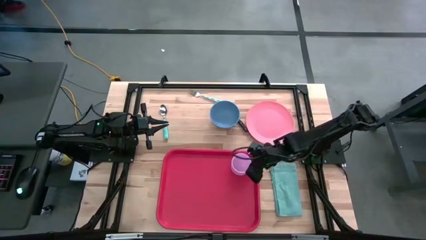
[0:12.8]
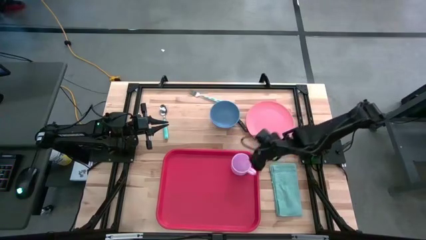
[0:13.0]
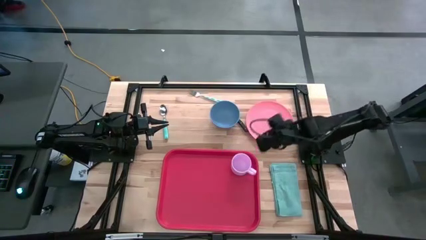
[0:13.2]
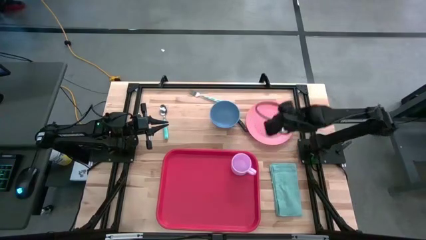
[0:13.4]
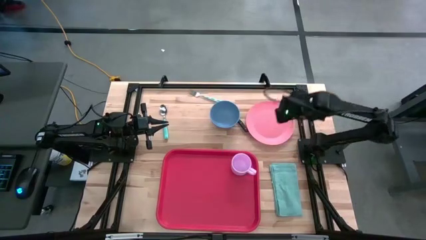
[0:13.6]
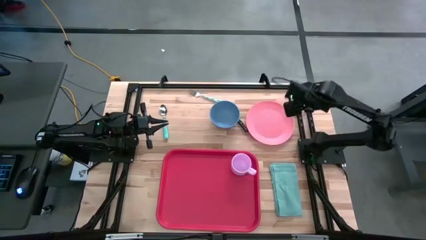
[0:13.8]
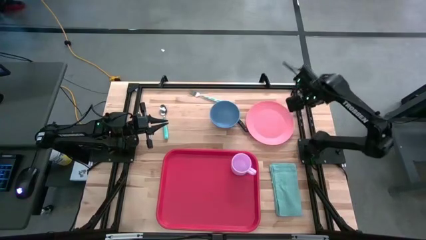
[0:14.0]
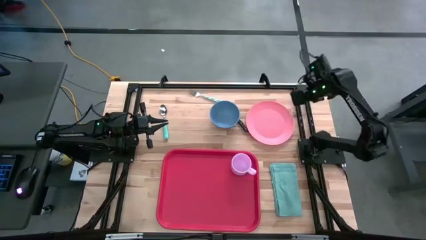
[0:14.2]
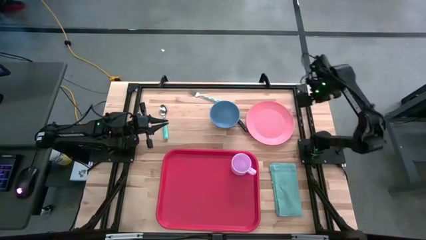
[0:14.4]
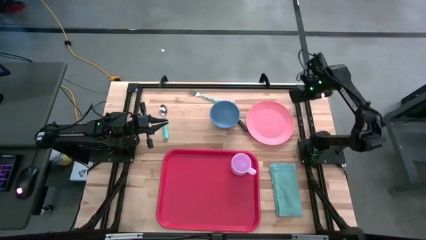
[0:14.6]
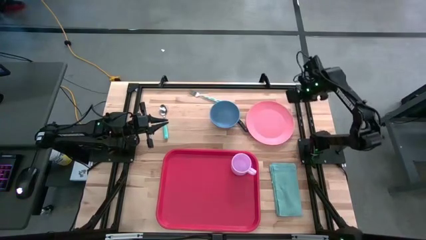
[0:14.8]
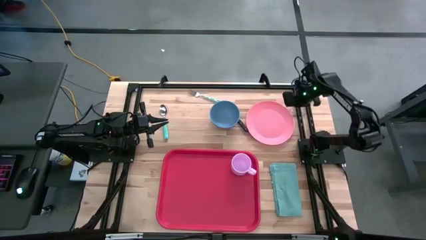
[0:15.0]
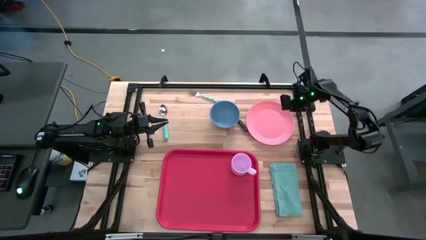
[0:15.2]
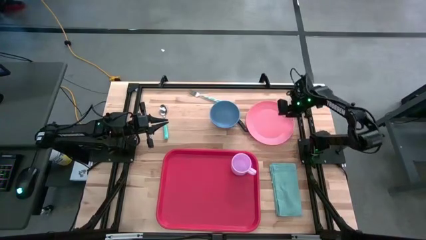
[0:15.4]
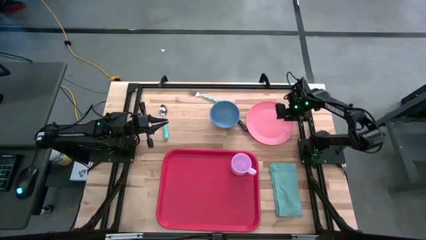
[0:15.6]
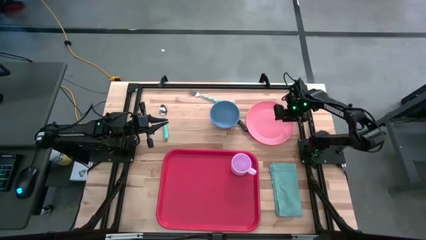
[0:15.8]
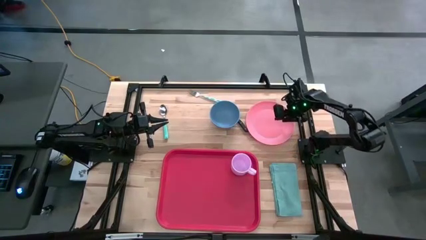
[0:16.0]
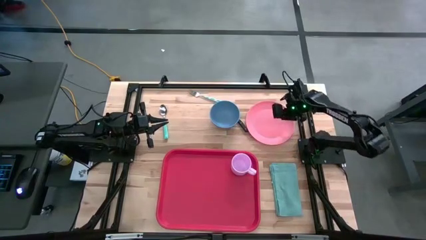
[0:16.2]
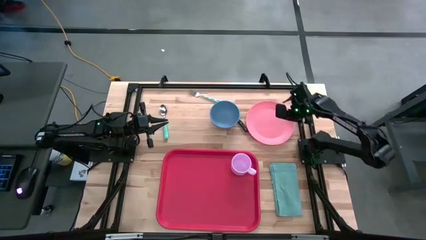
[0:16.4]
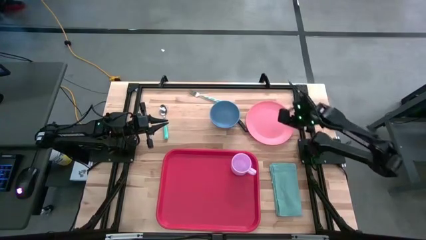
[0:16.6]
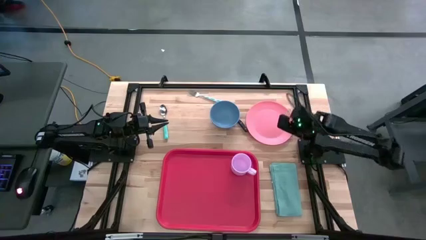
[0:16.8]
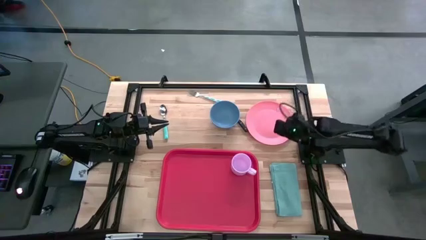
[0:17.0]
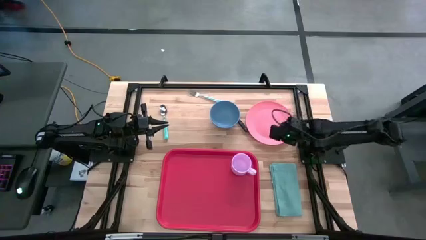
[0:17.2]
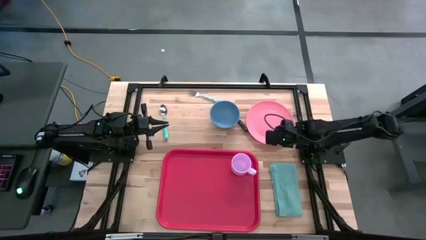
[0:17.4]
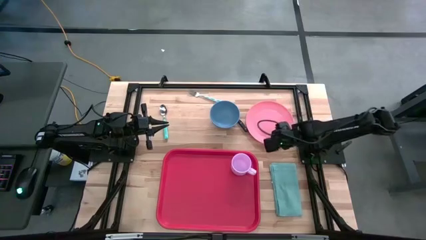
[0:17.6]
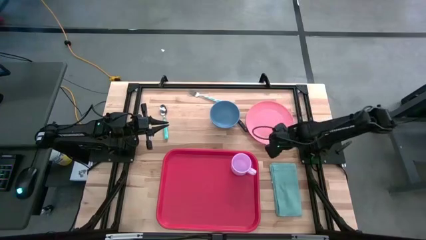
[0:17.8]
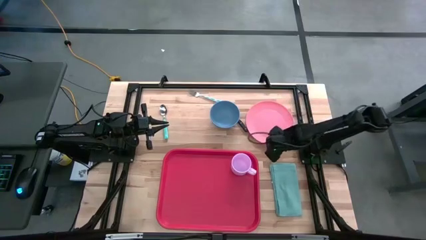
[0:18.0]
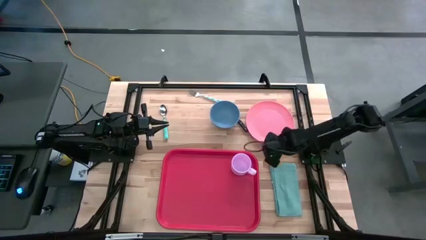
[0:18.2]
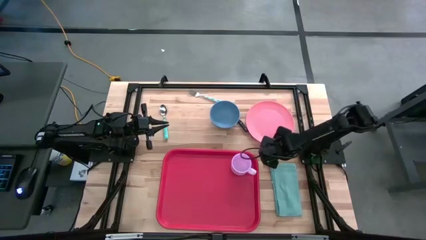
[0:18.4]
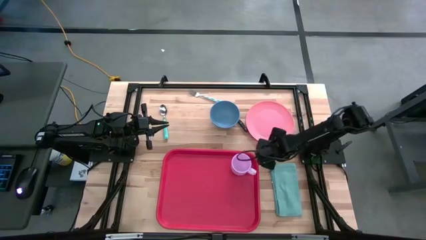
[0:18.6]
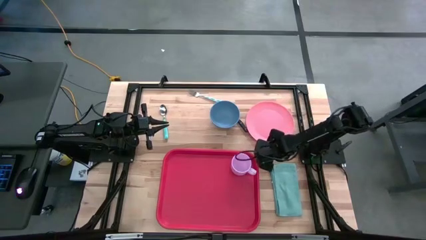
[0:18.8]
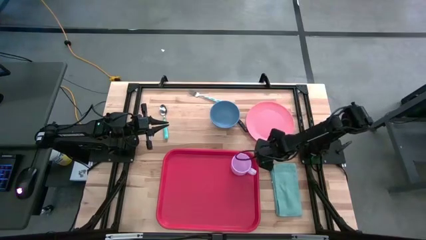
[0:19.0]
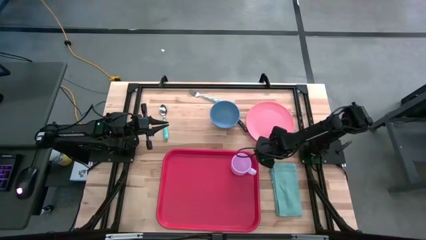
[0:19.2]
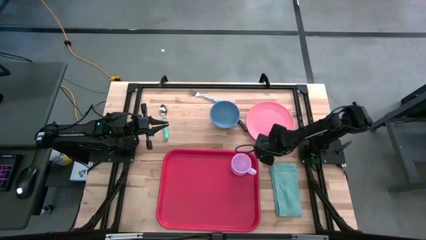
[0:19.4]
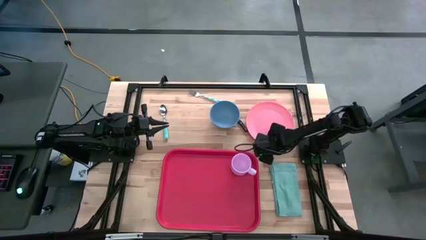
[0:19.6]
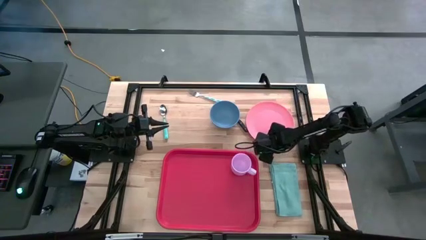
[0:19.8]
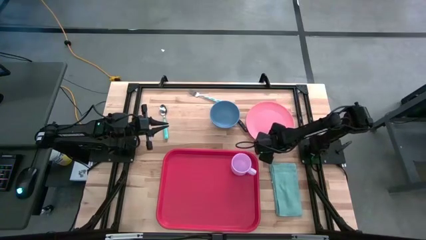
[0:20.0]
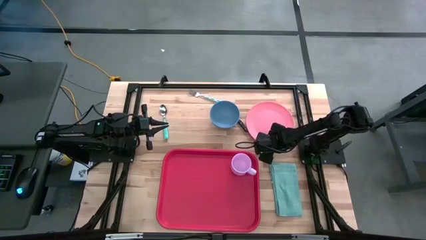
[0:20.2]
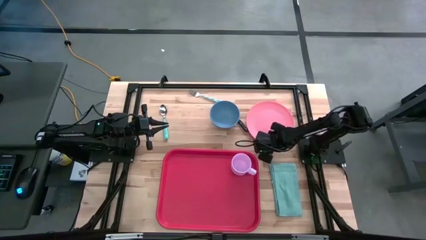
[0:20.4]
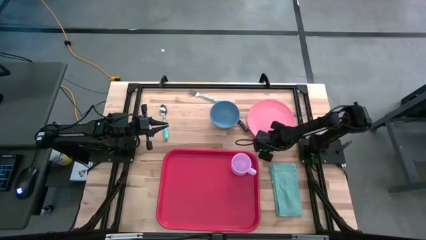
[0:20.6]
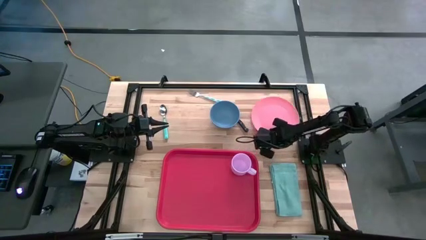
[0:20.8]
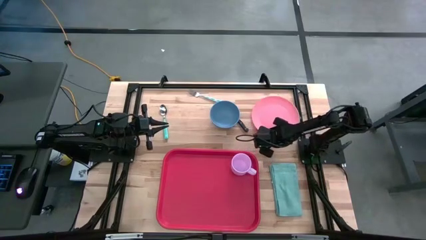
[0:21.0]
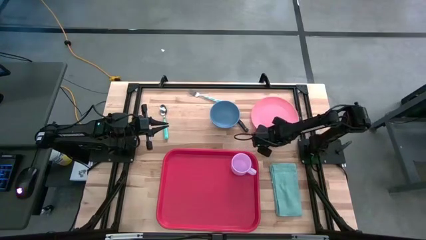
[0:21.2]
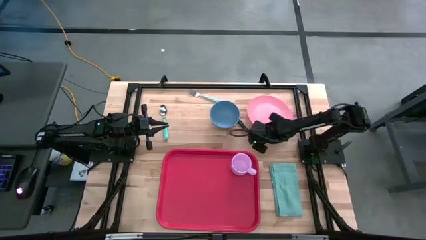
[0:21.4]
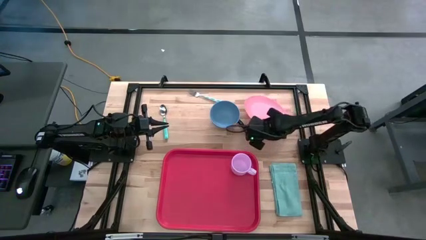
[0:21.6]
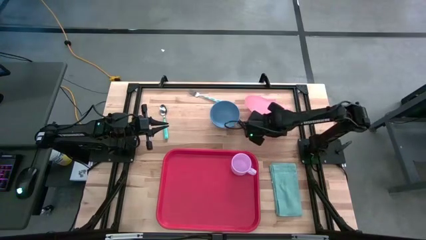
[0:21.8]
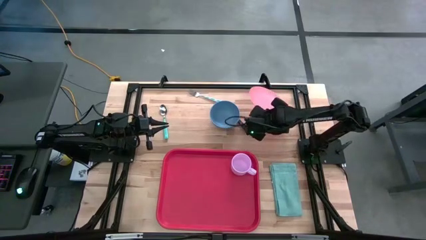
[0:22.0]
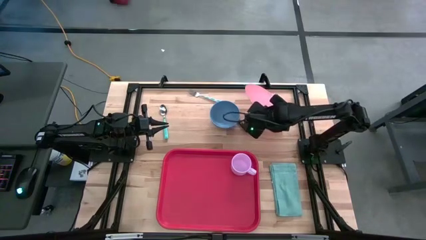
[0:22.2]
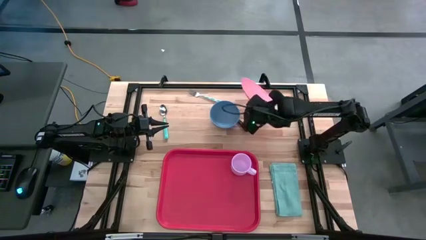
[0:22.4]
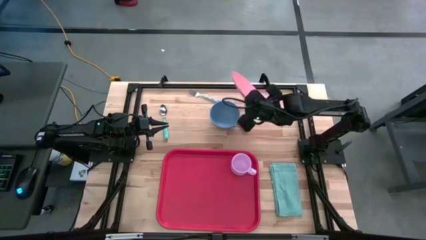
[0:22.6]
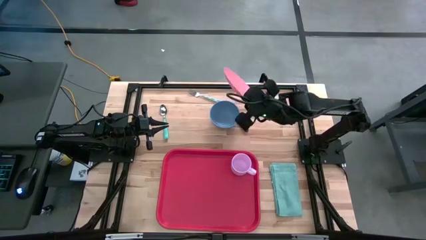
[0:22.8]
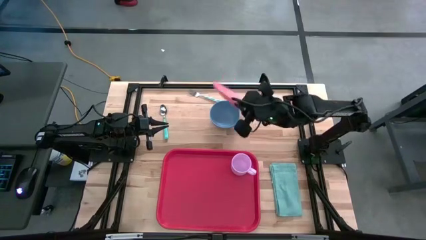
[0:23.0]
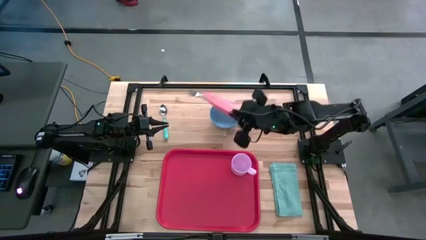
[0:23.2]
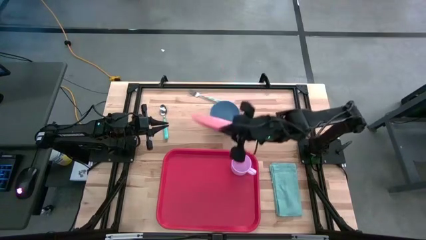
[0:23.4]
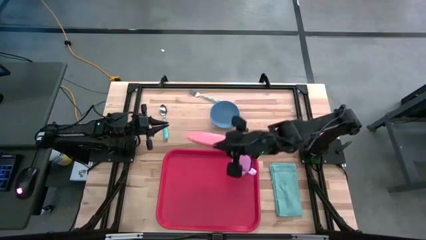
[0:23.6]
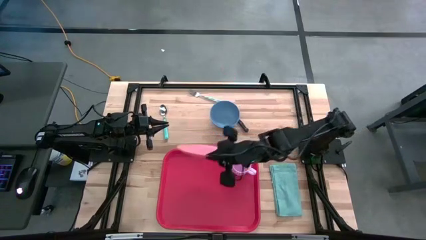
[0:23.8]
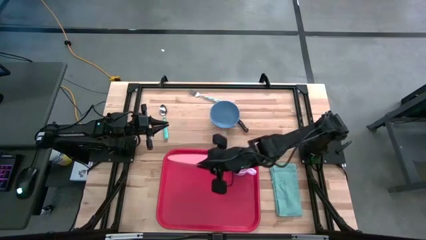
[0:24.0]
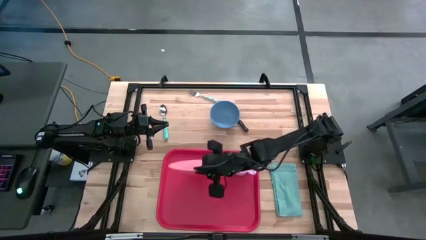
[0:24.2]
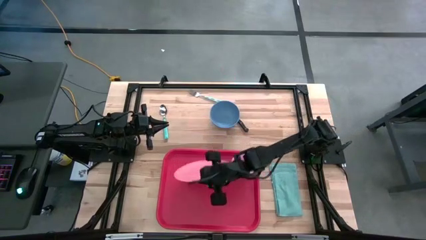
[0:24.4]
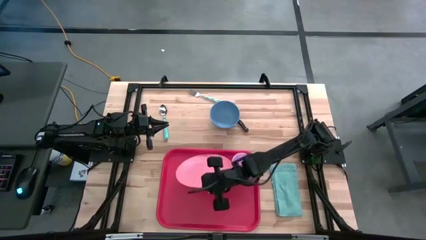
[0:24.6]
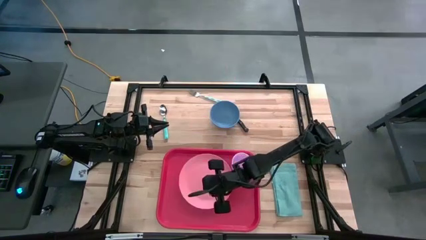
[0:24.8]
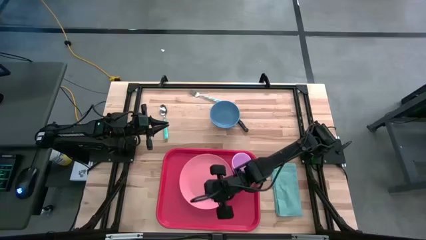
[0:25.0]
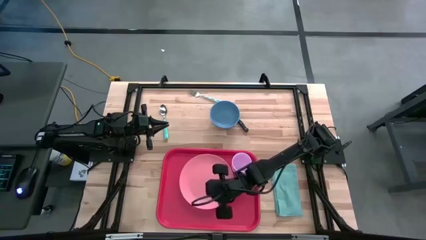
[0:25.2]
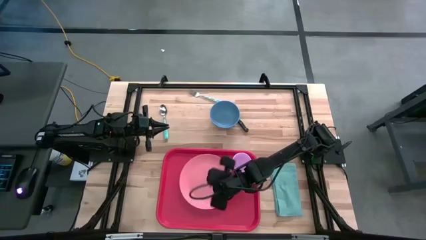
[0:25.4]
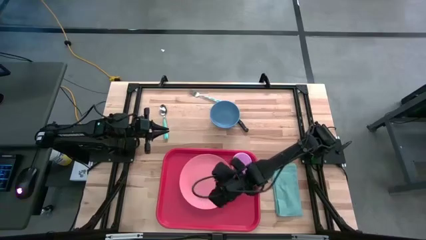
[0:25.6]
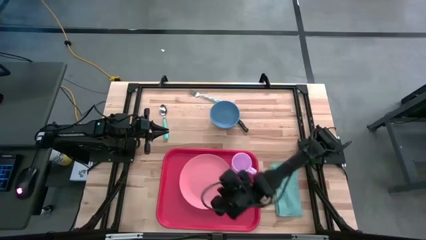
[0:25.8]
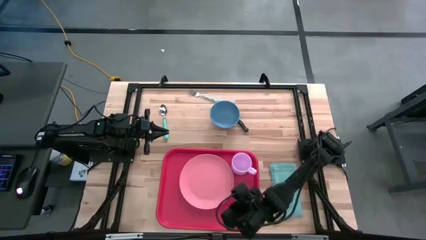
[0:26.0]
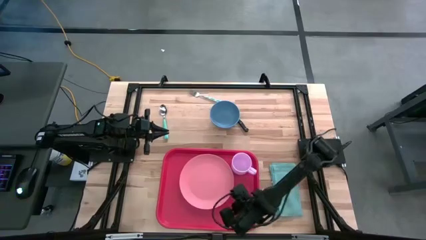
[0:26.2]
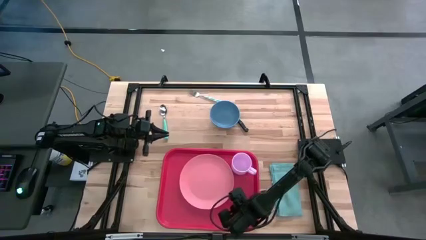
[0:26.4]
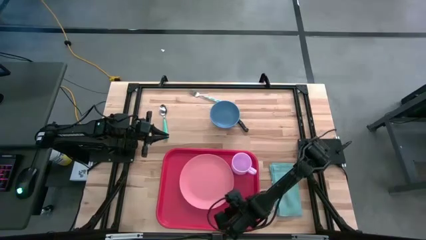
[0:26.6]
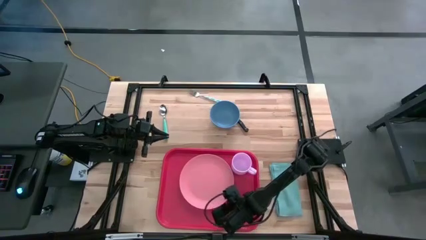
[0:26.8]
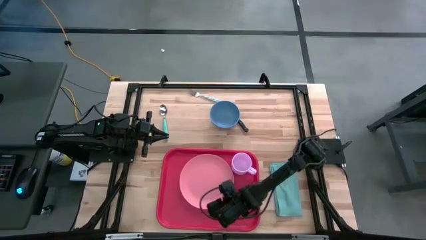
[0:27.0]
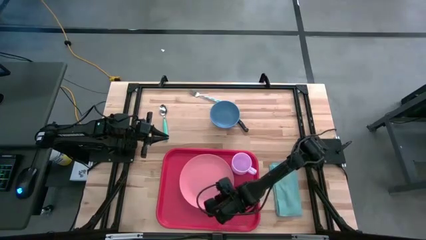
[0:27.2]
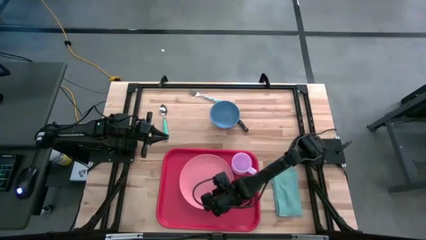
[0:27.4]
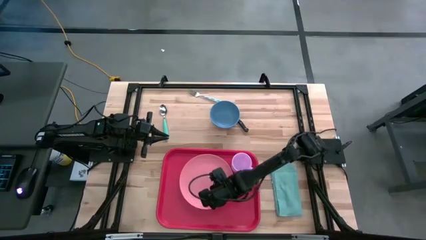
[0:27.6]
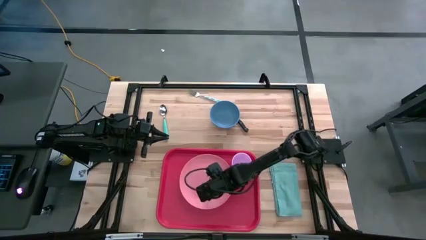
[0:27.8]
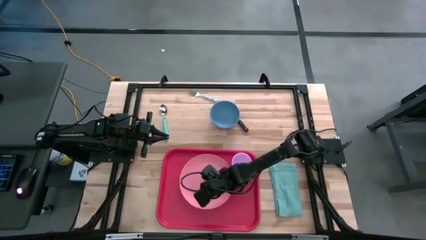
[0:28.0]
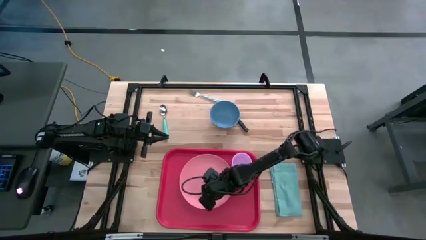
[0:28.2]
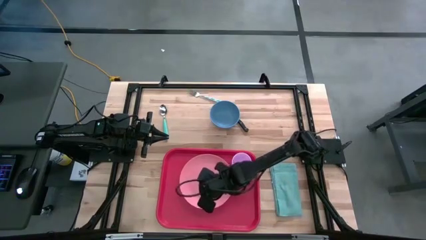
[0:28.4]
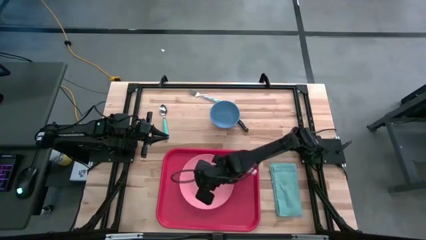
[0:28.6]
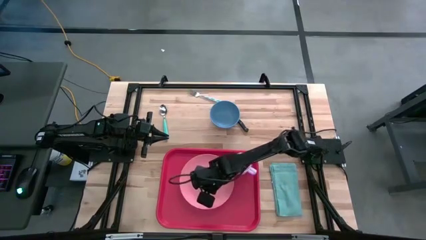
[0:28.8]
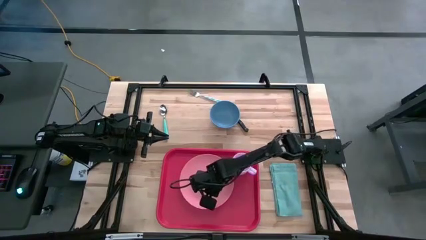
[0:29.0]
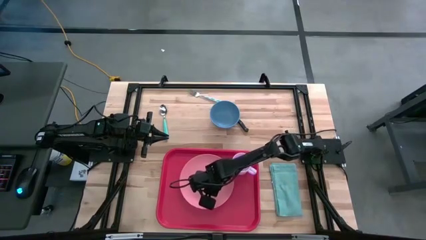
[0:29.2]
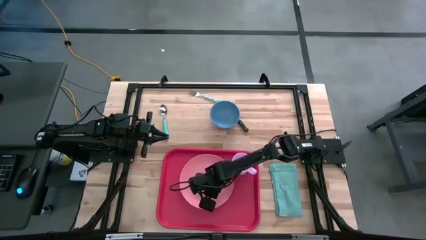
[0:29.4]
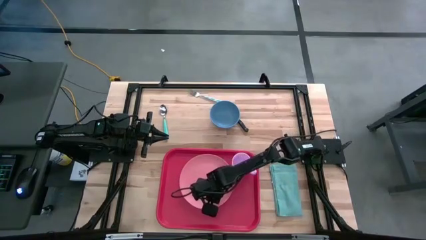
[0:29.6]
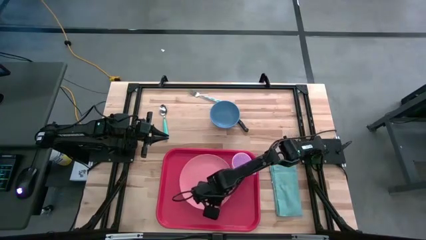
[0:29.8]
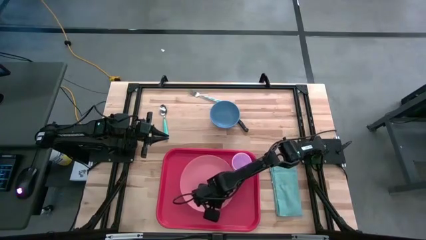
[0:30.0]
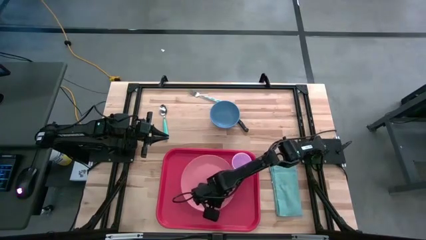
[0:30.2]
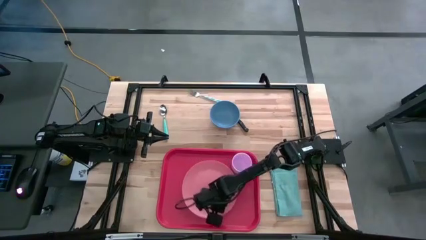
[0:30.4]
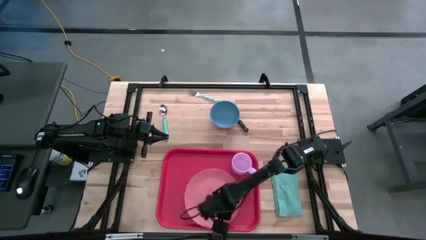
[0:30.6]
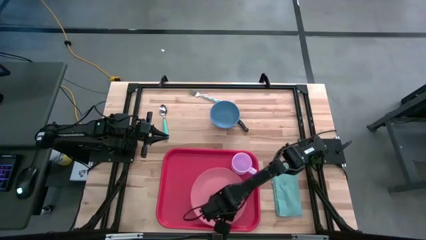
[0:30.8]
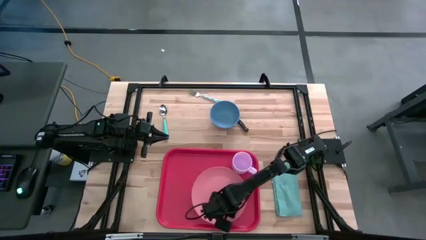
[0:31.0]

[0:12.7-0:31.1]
Task: Set up tray
Put the pink plate on the red serving tray to the bottom left of the purple mug
